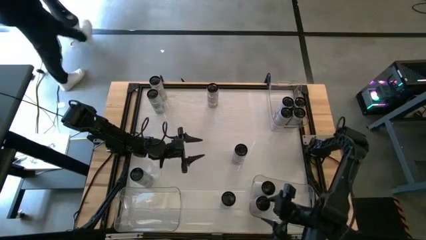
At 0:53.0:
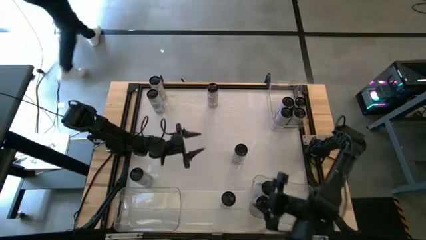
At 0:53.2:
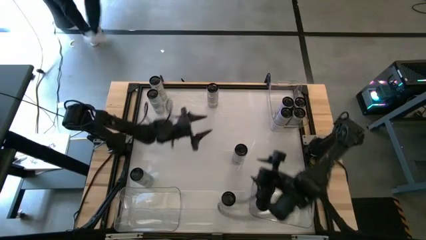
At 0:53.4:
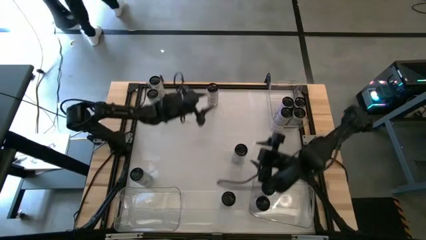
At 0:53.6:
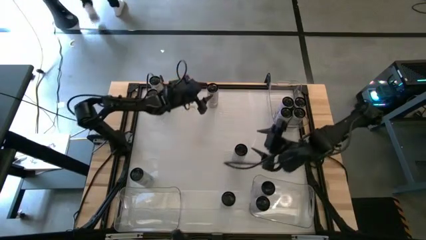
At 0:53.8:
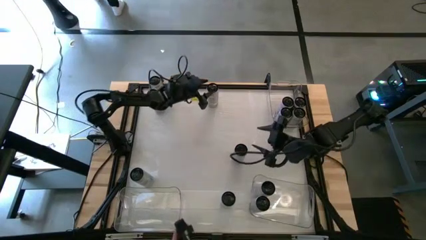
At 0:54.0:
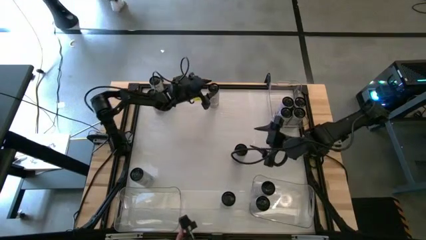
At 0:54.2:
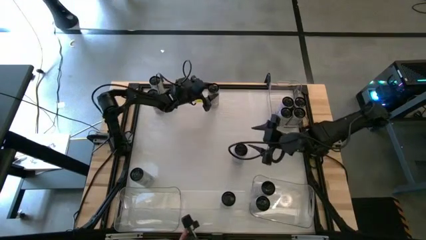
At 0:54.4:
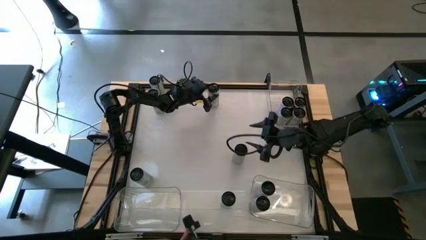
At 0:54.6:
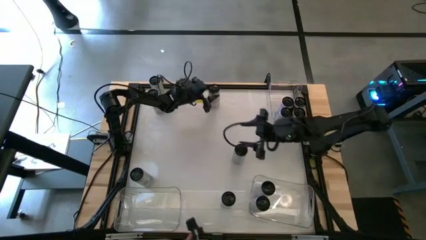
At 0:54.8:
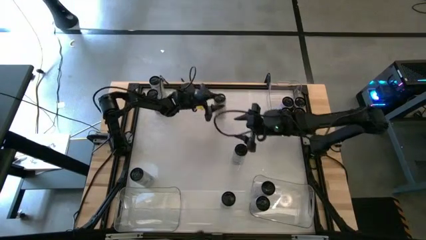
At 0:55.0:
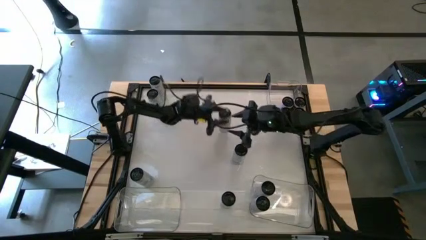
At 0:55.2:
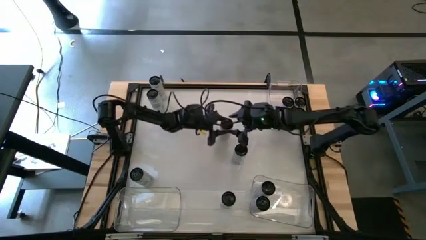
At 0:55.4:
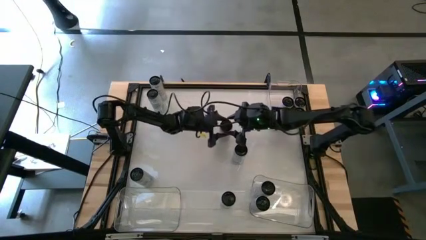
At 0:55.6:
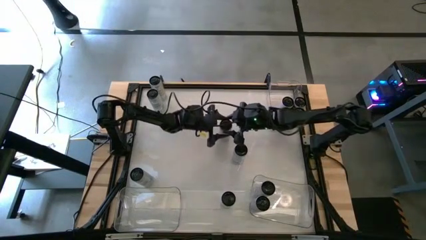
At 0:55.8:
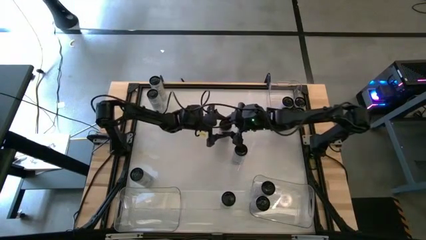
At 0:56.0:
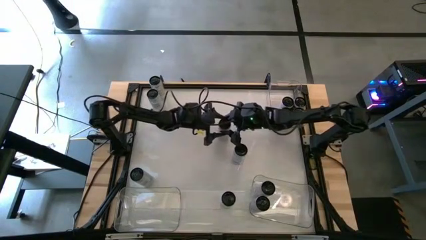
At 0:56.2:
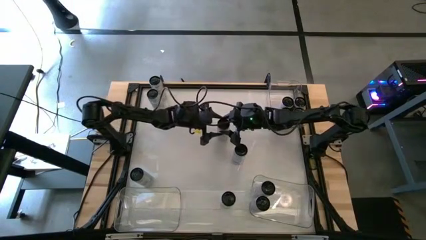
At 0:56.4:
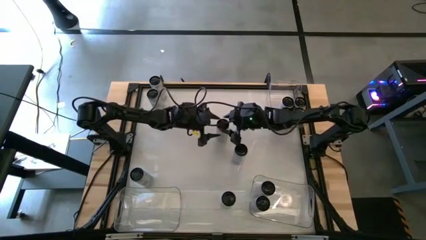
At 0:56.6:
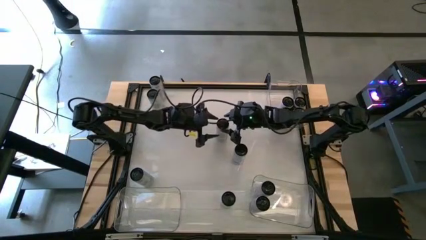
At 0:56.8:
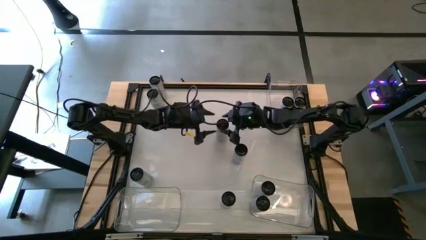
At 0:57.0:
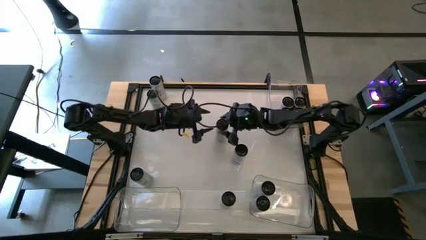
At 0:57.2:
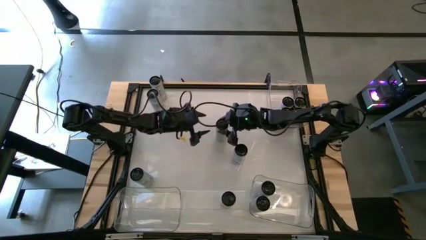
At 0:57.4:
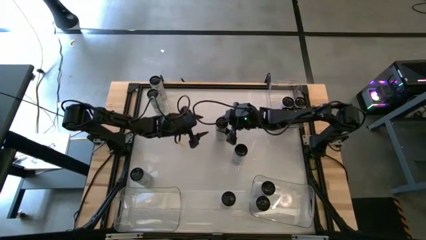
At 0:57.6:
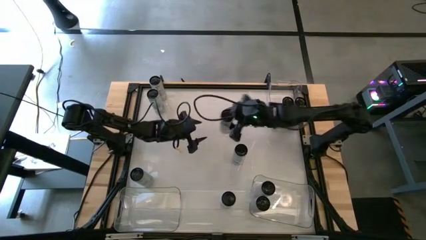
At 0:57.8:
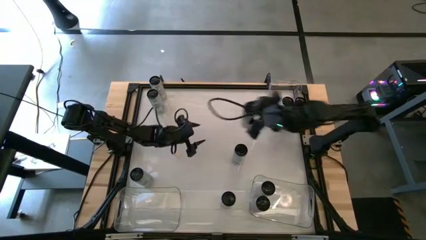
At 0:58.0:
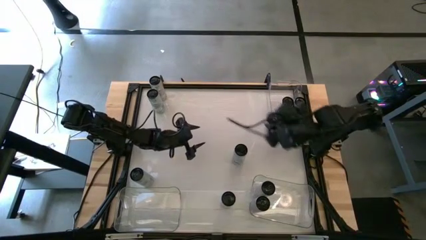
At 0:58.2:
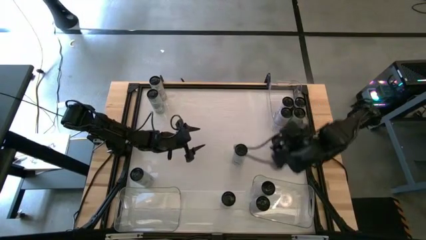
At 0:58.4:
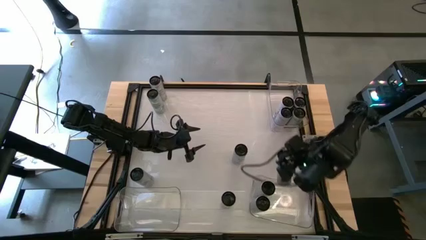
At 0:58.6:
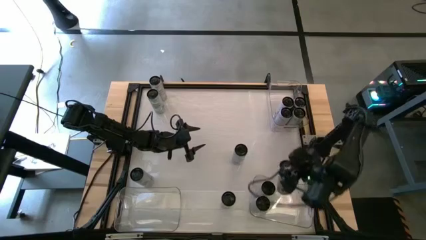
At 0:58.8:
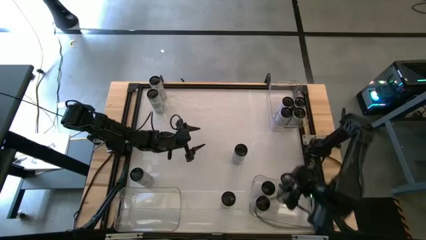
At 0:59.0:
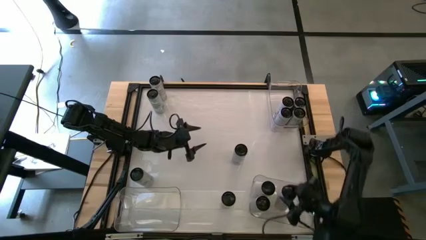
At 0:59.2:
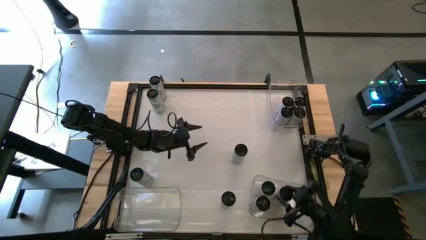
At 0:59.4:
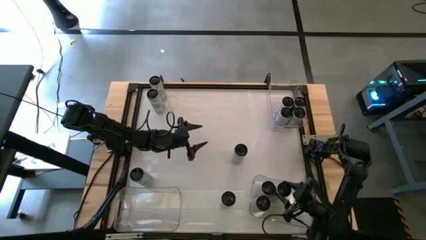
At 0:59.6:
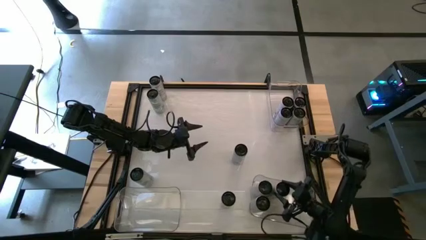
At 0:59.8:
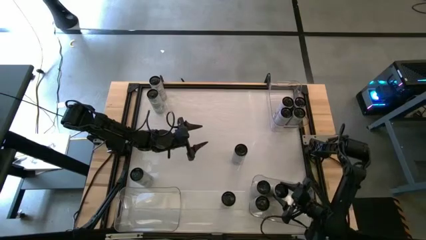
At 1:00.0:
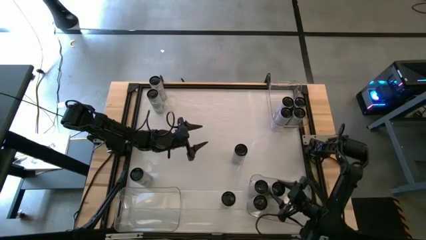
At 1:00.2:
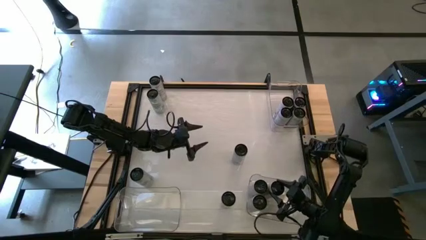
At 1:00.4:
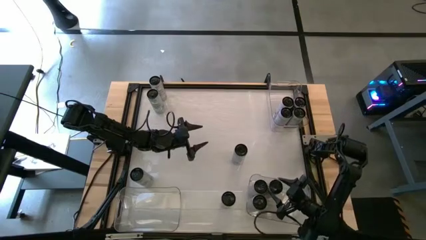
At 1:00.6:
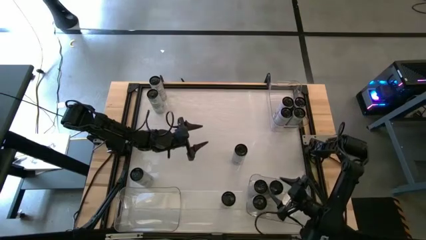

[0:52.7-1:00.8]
Task: Sort soda cans
Put the right white-yellow soda can into the bottom right transparent bin

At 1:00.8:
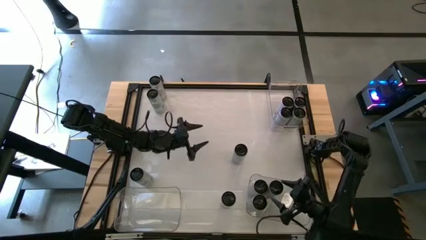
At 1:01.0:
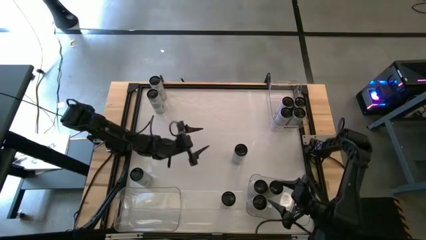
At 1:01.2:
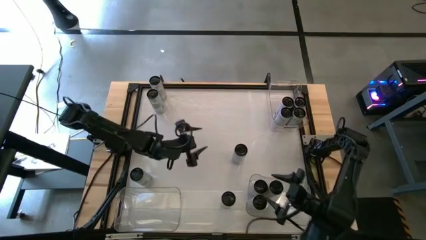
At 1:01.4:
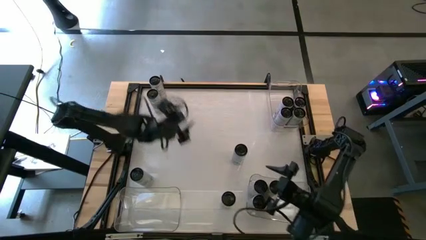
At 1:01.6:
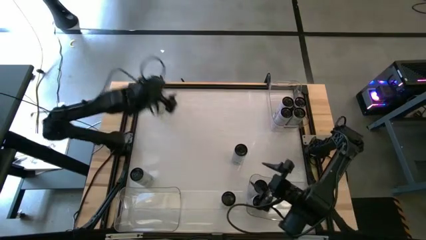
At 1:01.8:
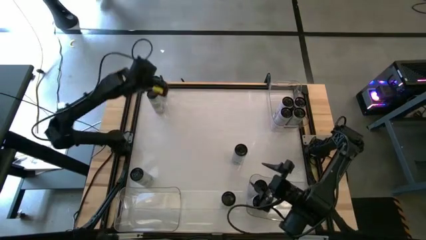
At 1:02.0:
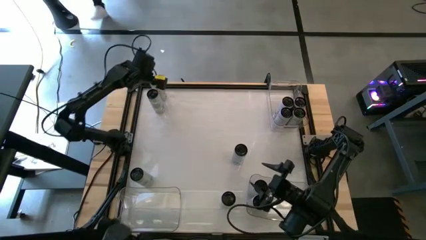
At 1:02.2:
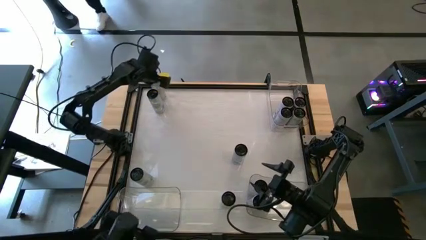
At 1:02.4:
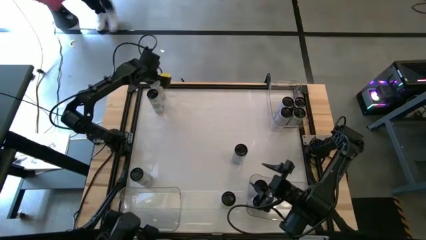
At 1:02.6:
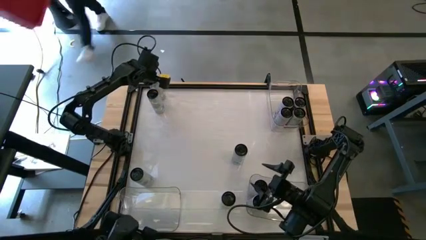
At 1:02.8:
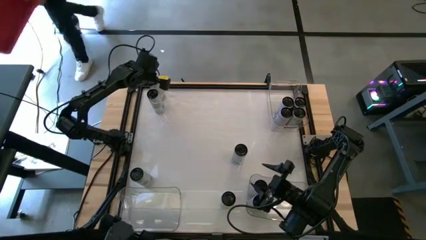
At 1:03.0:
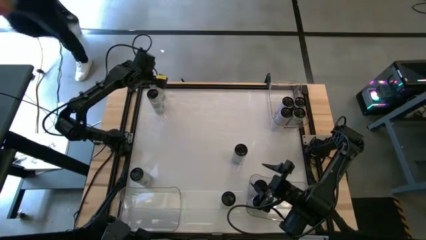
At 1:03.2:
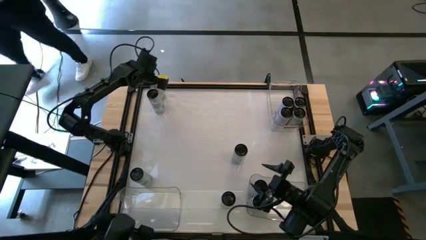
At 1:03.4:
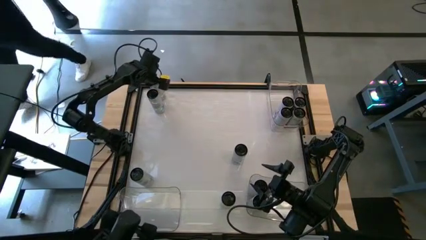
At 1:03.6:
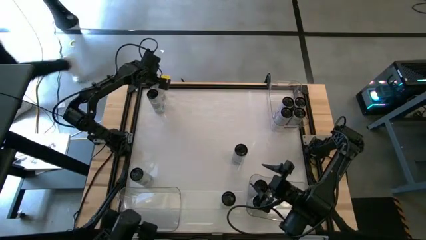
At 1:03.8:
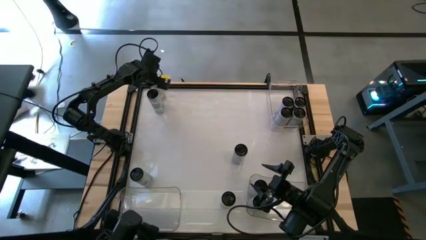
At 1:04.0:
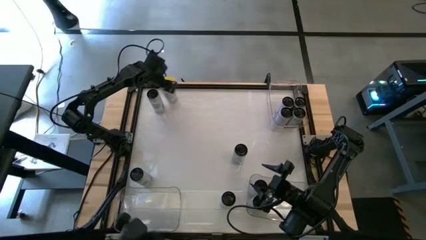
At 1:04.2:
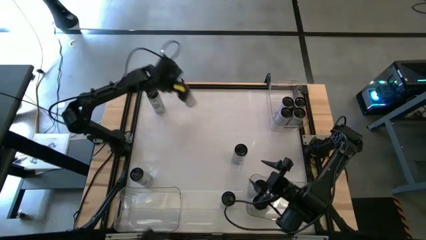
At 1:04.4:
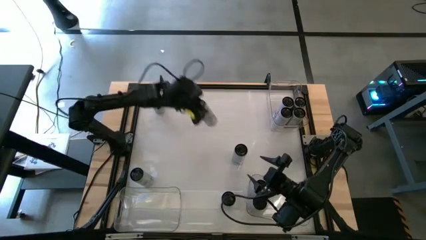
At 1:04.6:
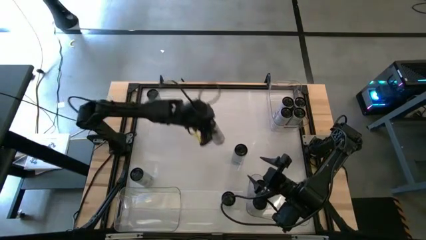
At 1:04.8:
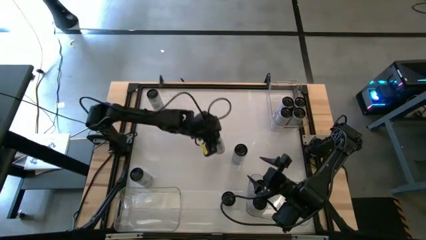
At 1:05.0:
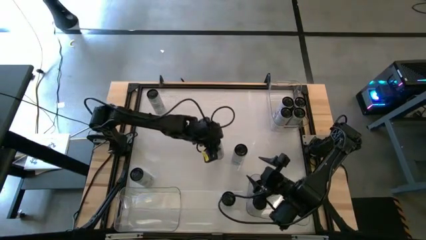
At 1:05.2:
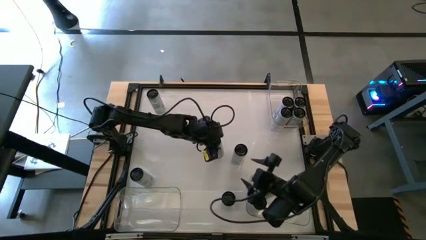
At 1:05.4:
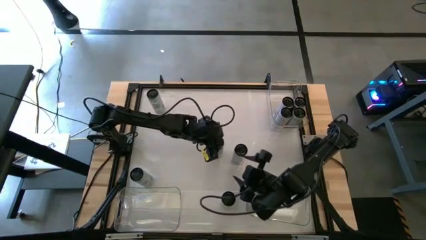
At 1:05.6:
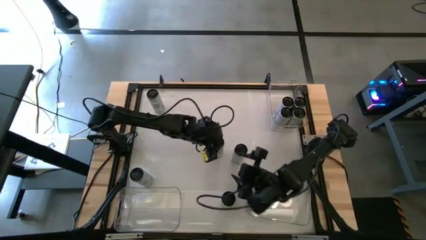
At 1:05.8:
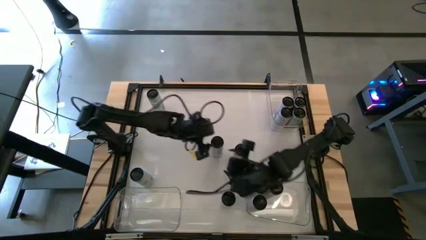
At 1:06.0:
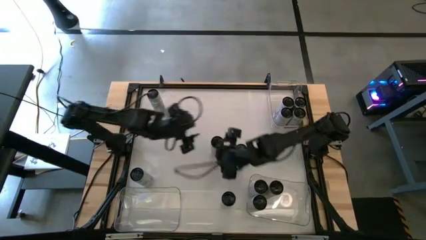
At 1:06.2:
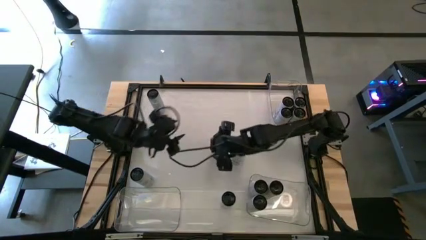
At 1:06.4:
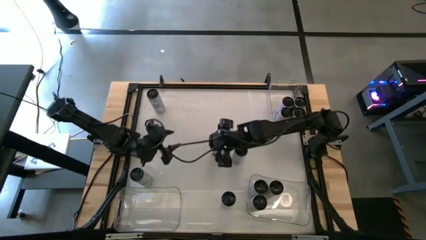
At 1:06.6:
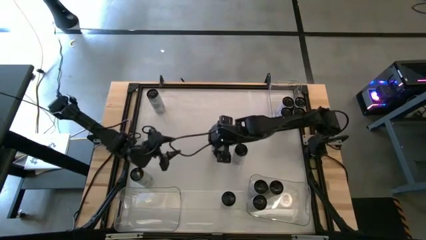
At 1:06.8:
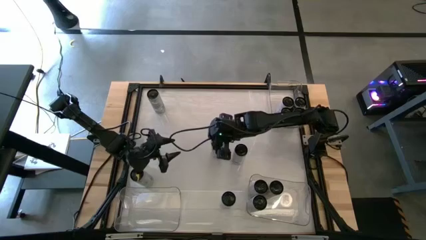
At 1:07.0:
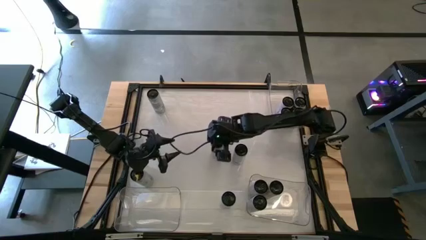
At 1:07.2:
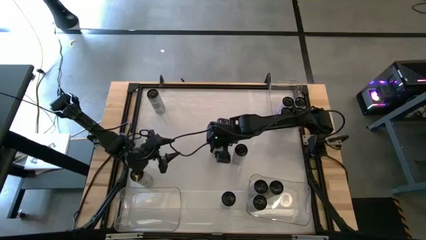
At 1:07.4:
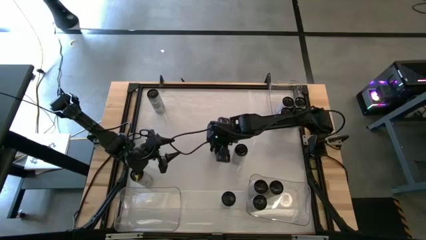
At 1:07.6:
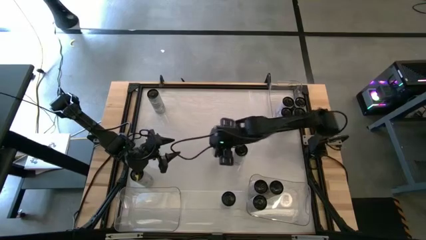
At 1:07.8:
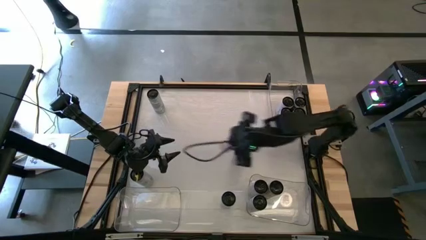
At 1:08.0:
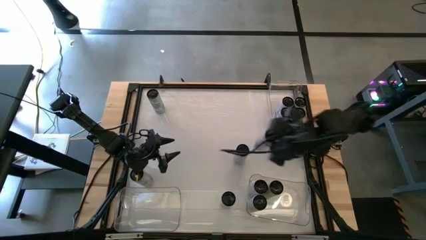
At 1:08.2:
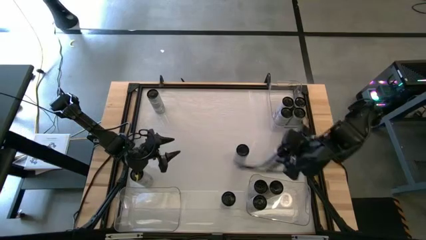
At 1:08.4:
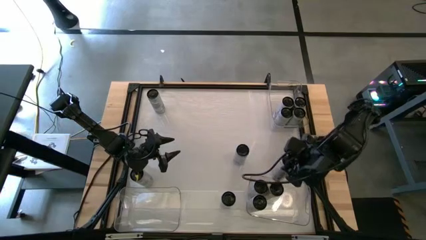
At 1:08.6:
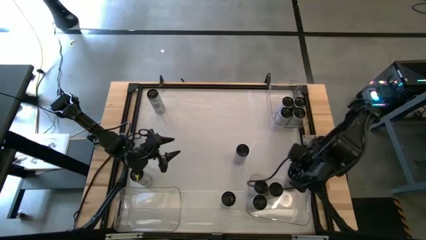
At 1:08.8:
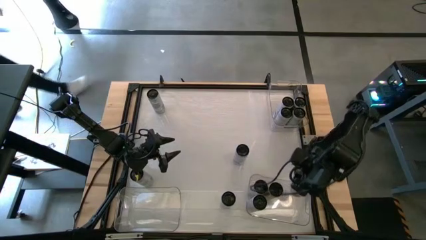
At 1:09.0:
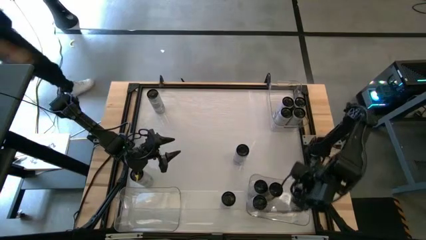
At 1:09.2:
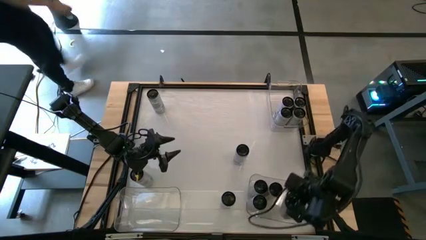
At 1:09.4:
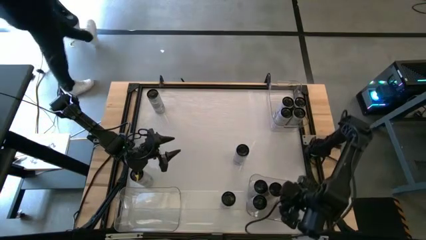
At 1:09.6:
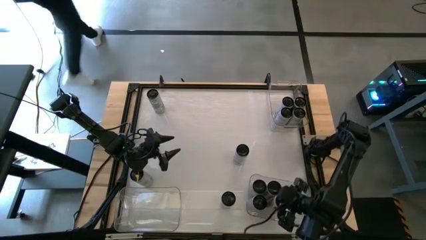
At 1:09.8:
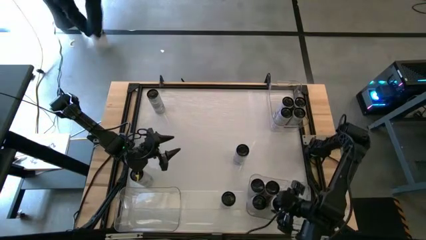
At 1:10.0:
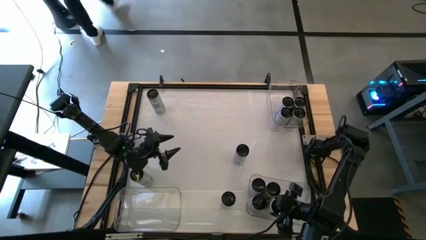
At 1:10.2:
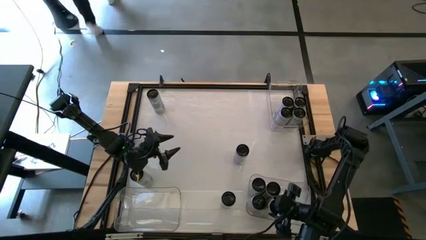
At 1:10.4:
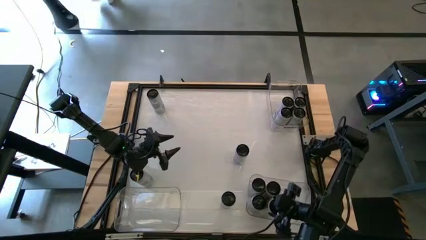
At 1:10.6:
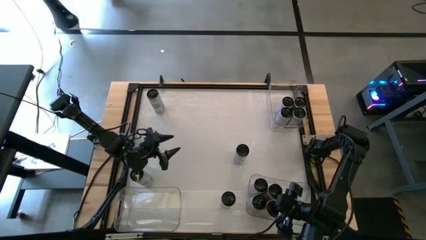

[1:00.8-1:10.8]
Put the white-yellow soda can into the bottom right transparent bin
